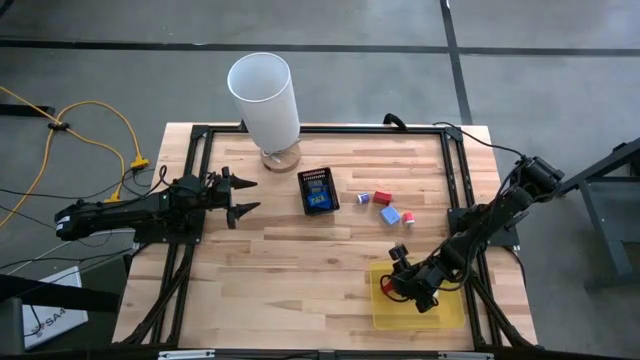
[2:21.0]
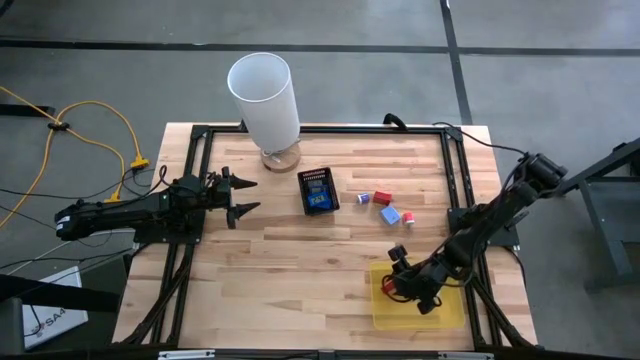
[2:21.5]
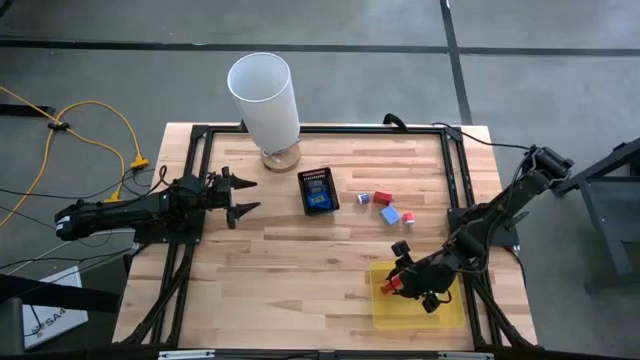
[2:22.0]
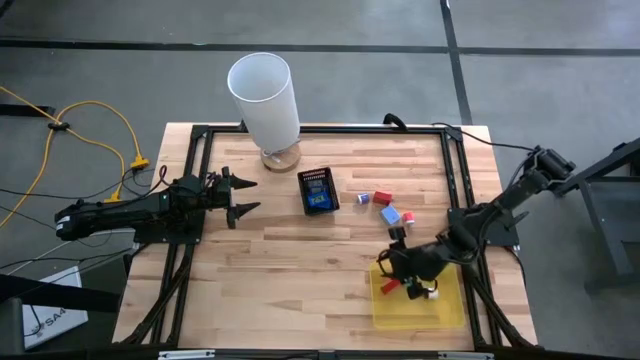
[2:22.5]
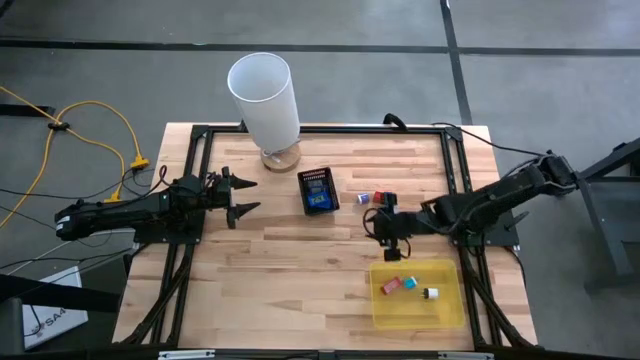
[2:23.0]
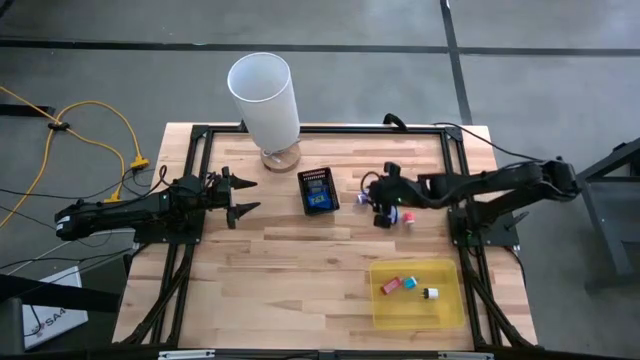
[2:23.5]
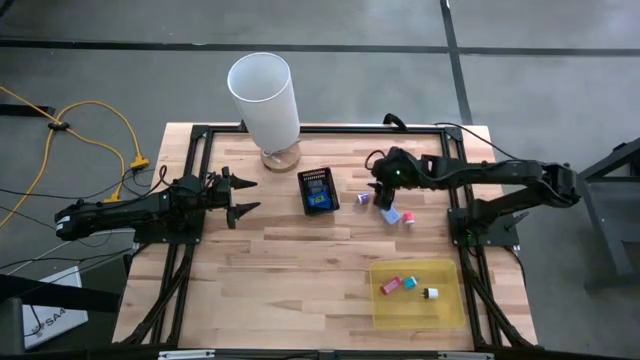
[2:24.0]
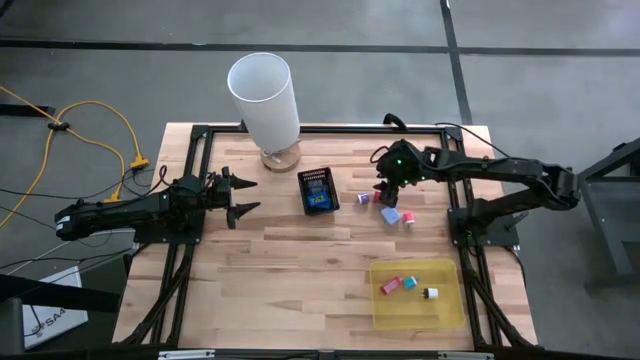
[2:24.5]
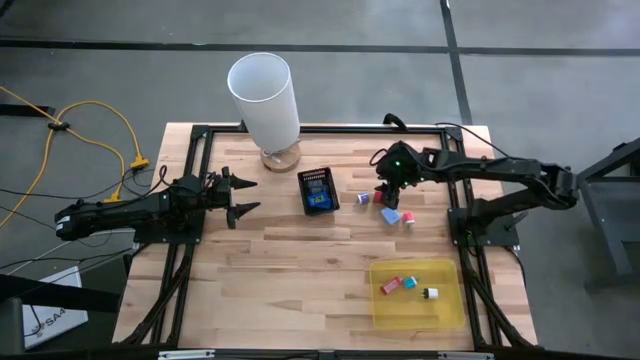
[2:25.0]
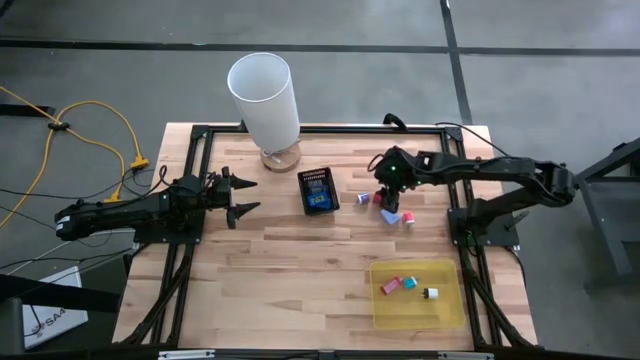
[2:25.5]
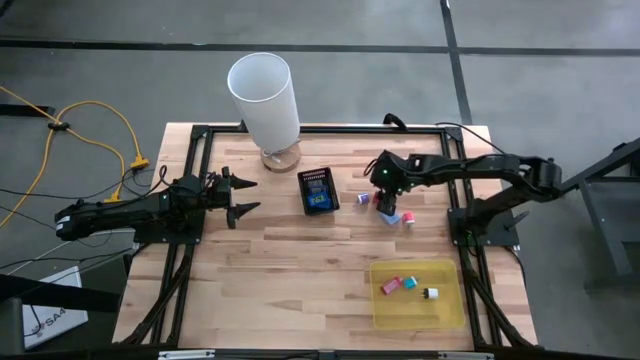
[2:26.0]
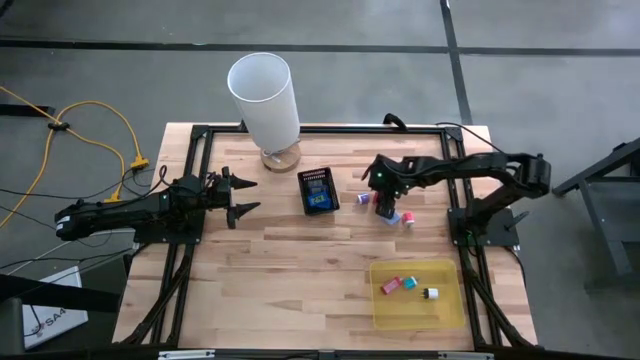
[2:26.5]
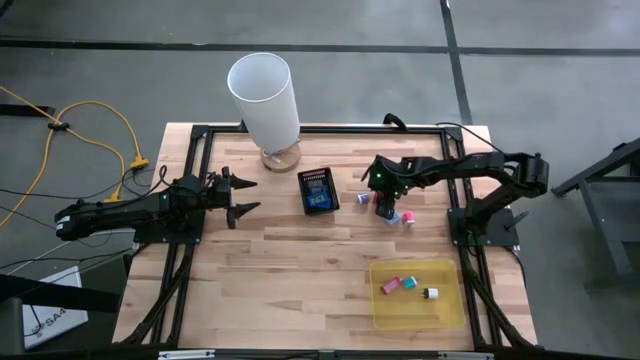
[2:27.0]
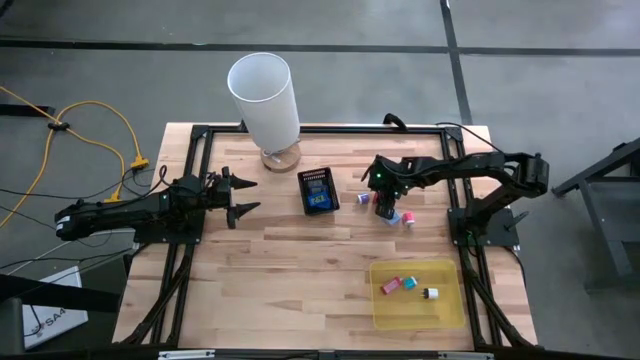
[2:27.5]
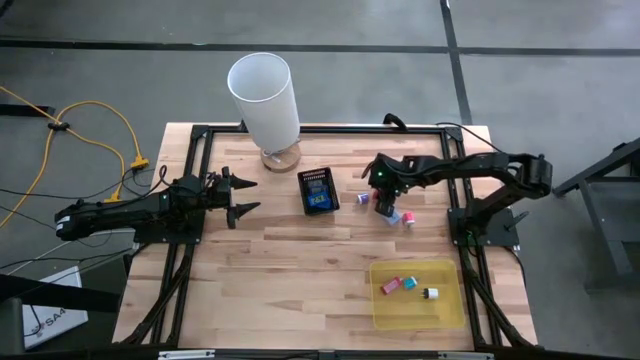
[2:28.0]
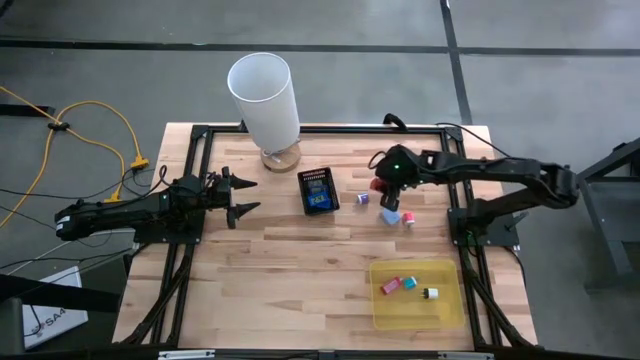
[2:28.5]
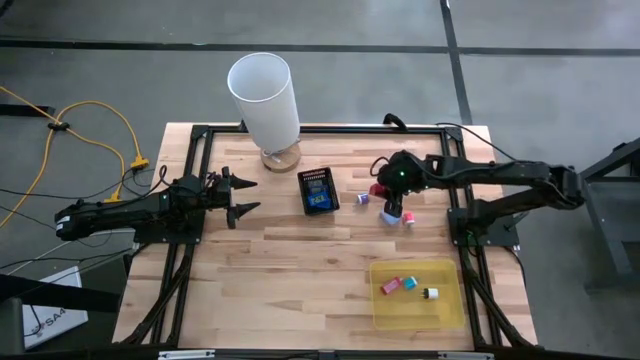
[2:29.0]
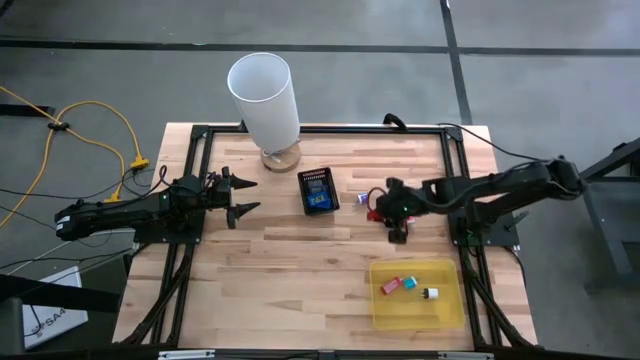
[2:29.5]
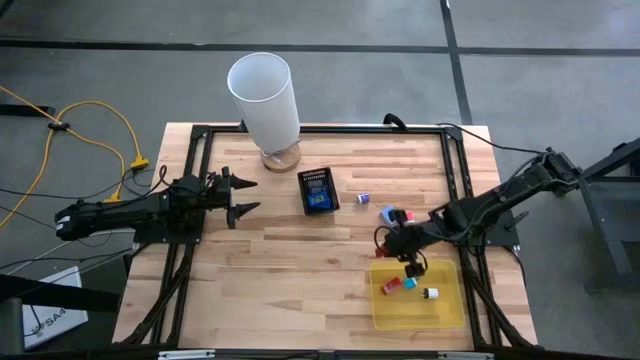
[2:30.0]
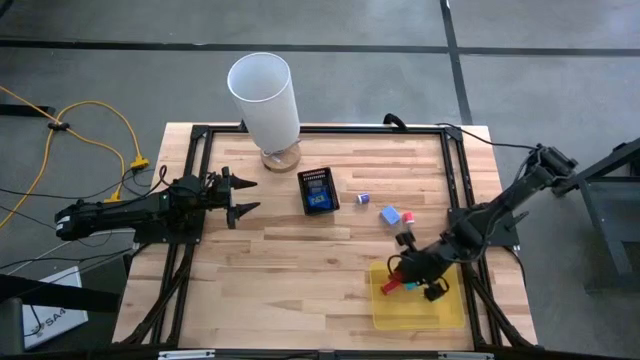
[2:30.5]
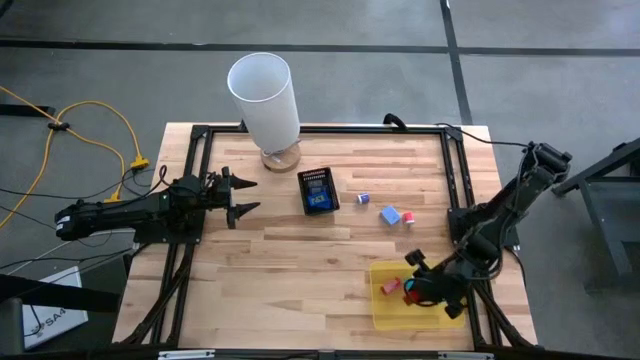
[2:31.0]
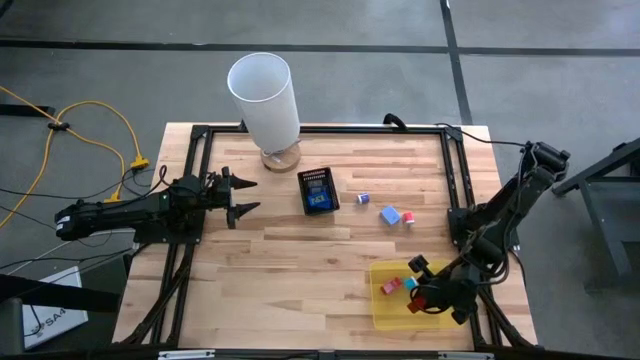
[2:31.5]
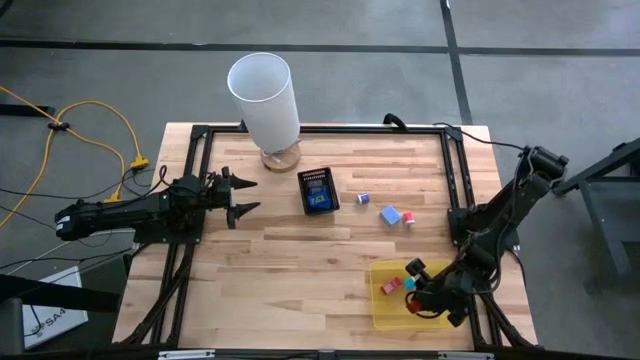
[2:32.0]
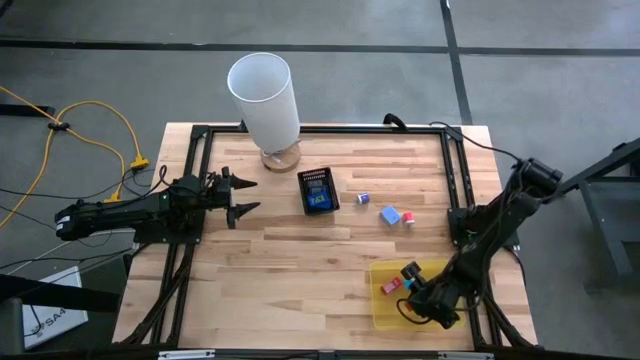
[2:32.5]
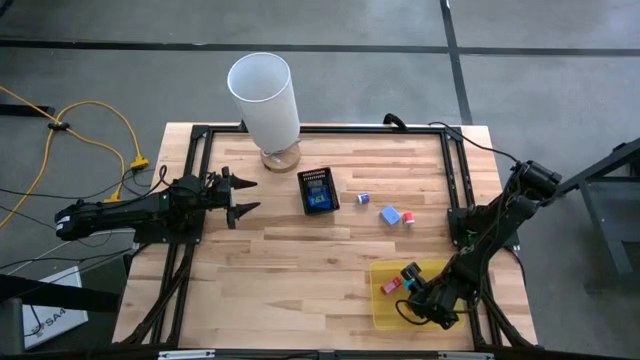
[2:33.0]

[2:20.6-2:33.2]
Task: Pick & Place Office items
Put the red adapter into the yellow bin

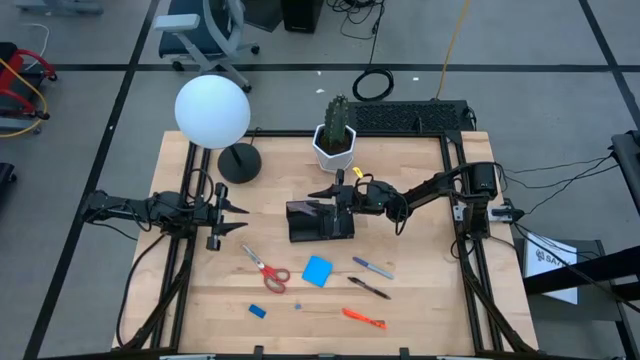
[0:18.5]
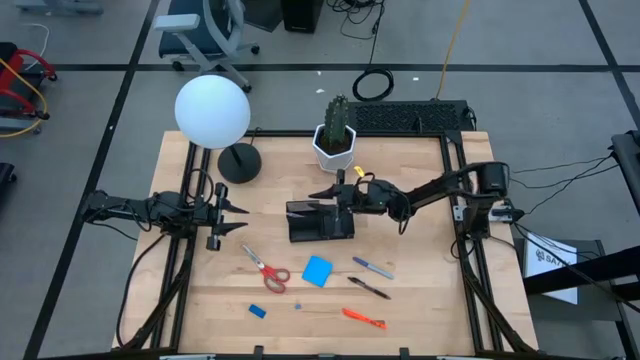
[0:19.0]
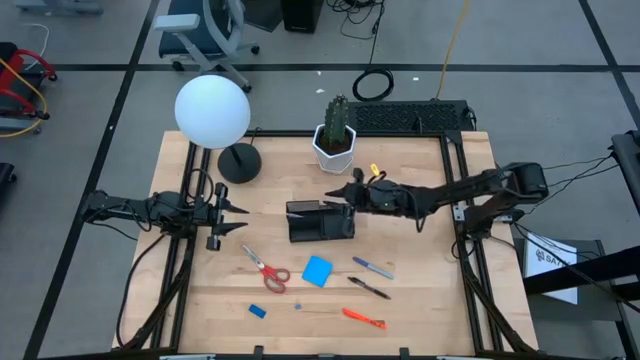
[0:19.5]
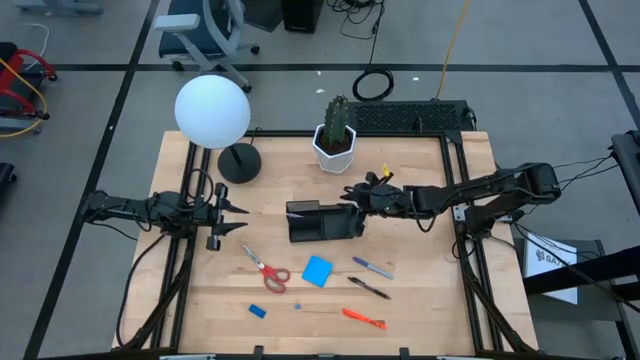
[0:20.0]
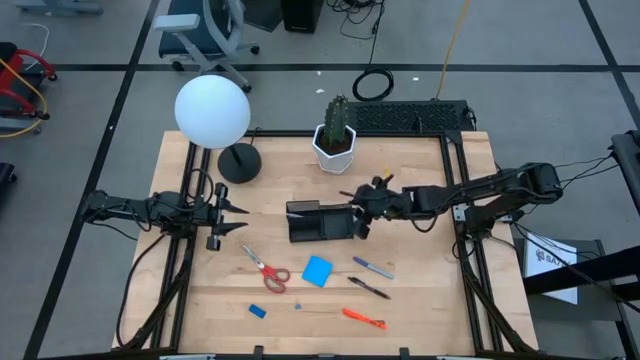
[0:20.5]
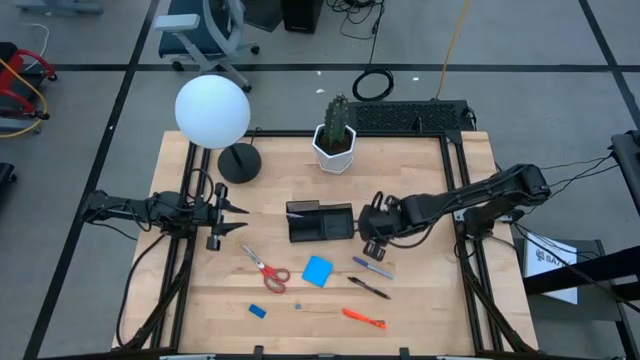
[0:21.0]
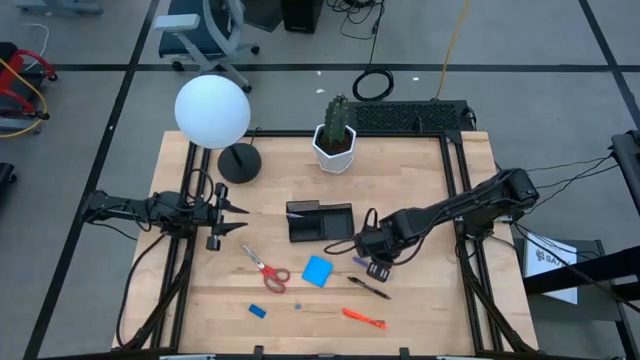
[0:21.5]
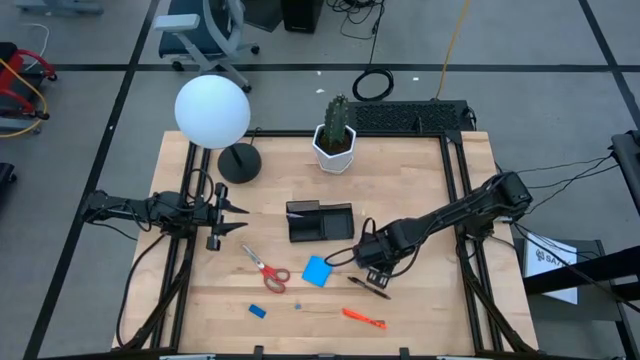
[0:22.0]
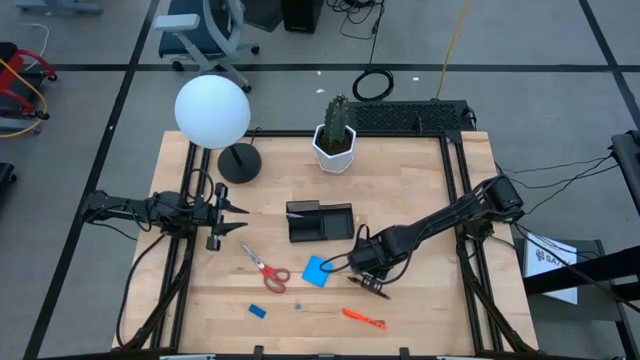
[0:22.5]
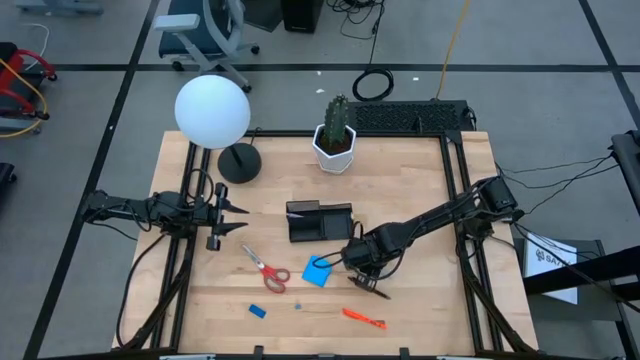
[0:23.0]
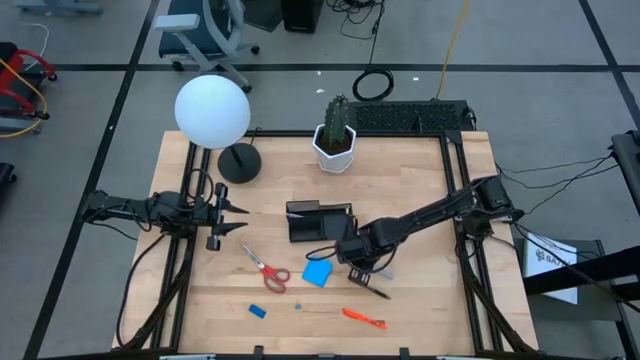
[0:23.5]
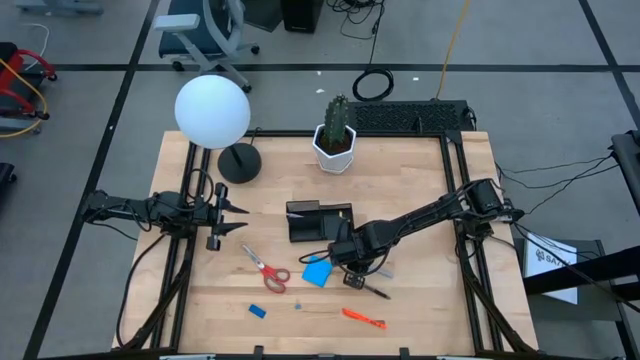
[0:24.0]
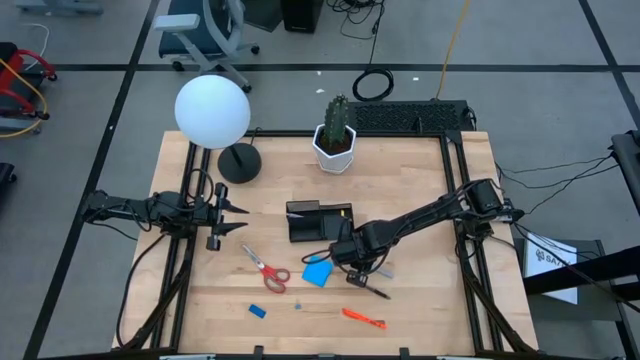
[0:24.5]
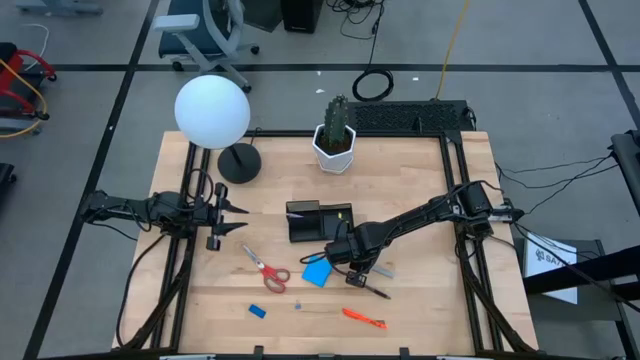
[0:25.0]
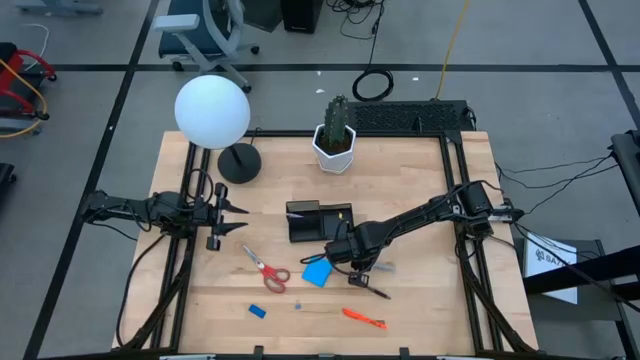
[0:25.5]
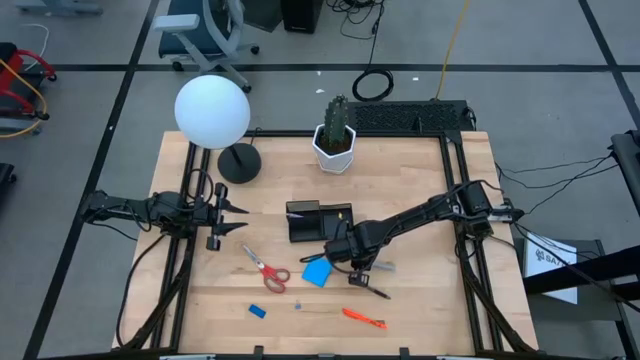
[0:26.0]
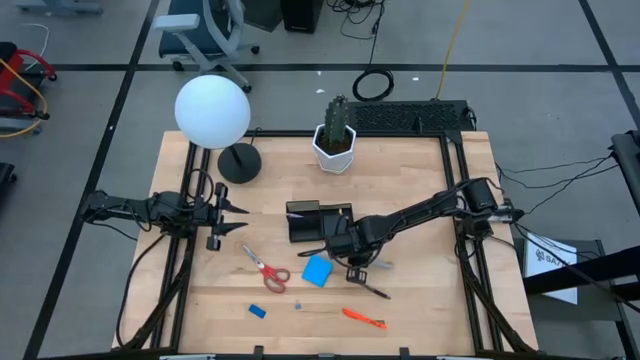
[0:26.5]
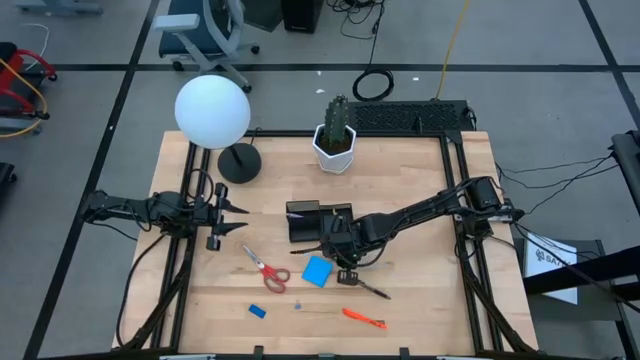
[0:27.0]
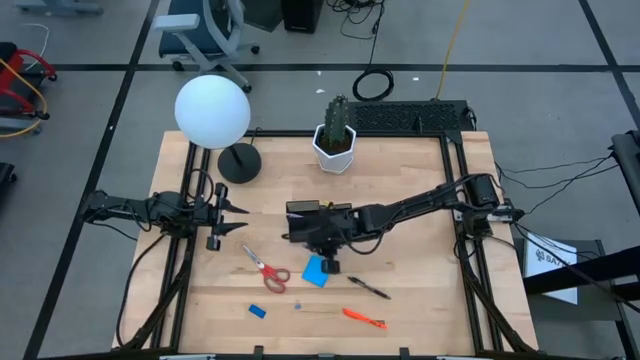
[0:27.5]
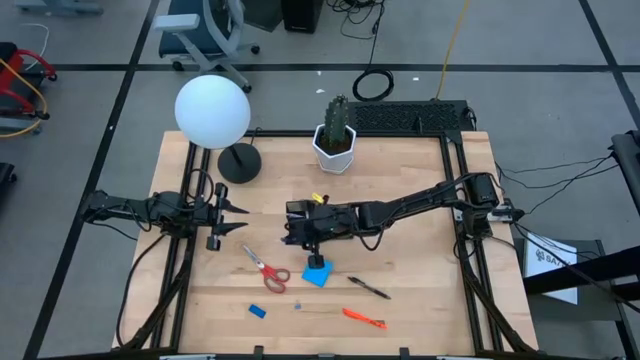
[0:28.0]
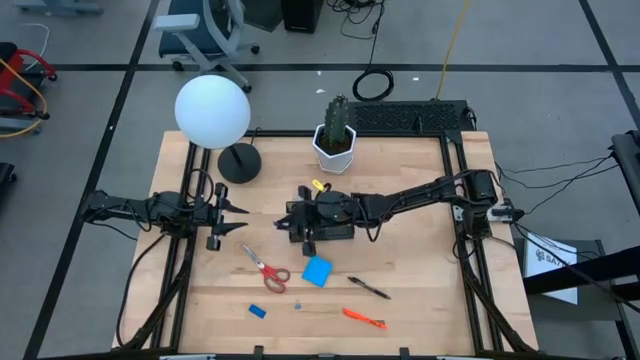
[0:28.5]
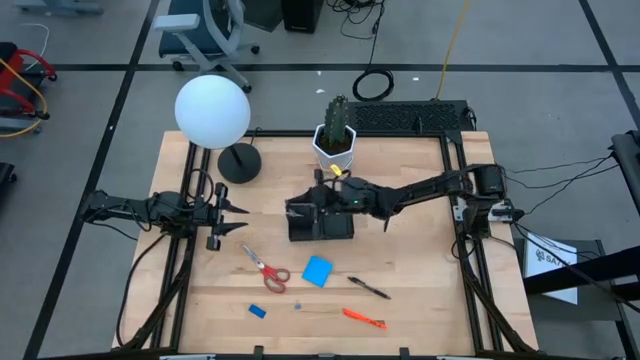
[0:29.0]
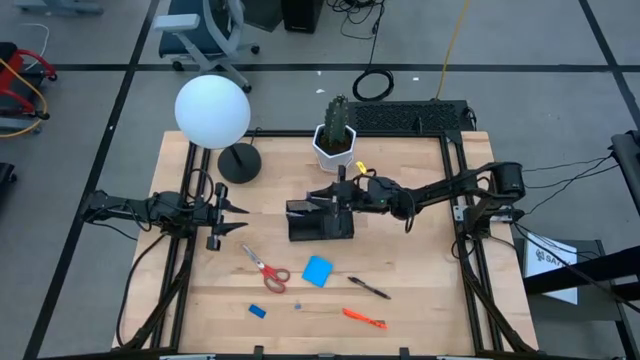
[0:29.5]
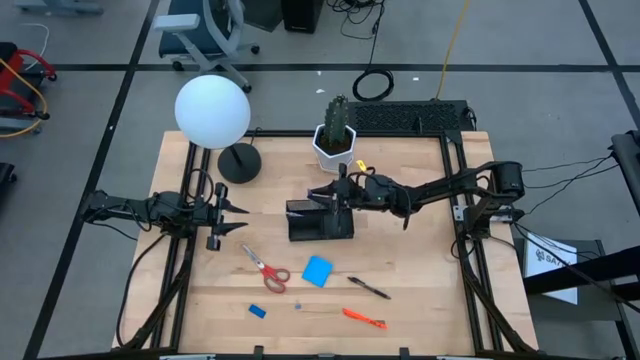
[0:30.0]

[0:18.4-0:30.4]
Task: Pick and place office supplies into organizer
Put the blue pen into the black desk organizer
